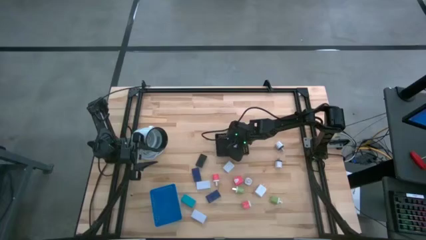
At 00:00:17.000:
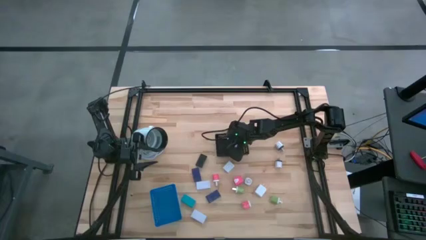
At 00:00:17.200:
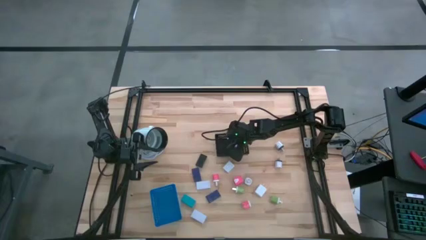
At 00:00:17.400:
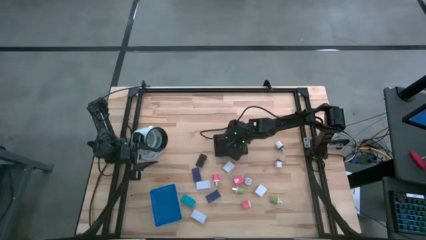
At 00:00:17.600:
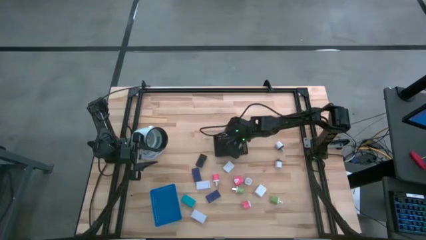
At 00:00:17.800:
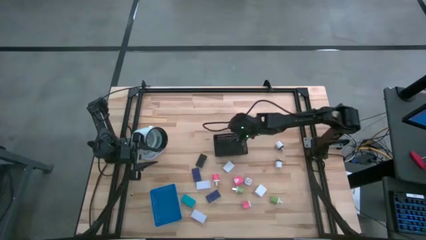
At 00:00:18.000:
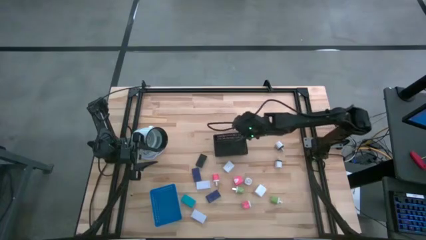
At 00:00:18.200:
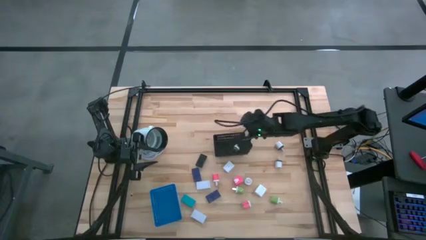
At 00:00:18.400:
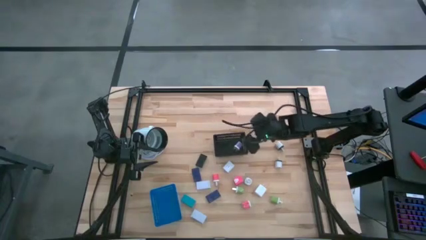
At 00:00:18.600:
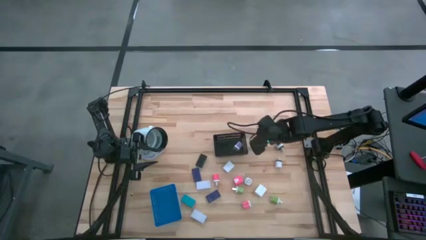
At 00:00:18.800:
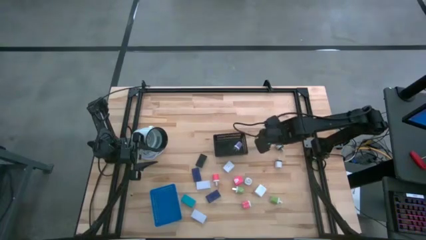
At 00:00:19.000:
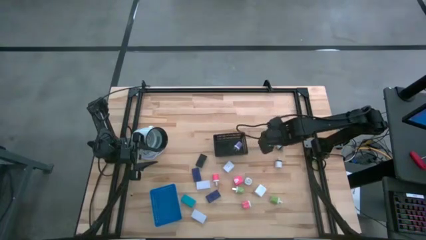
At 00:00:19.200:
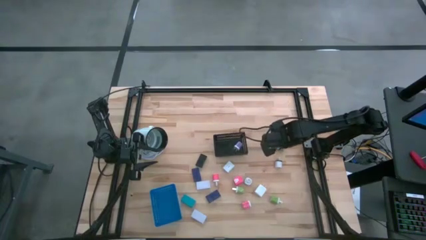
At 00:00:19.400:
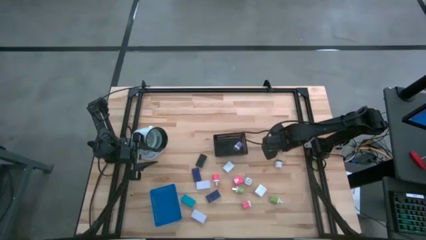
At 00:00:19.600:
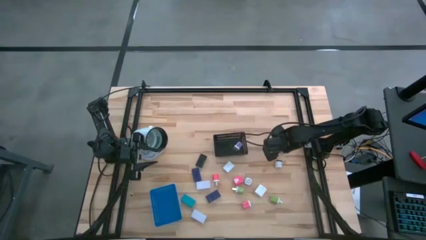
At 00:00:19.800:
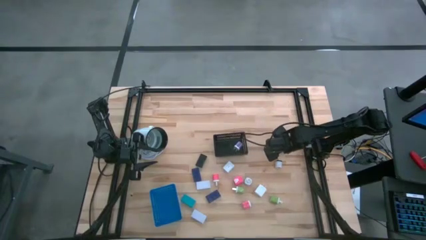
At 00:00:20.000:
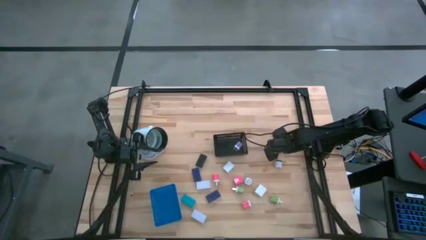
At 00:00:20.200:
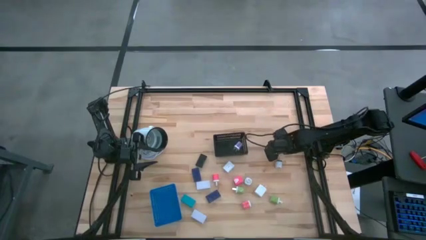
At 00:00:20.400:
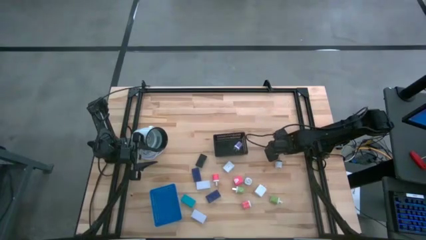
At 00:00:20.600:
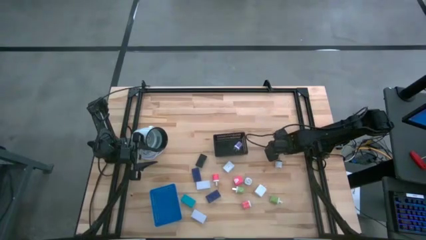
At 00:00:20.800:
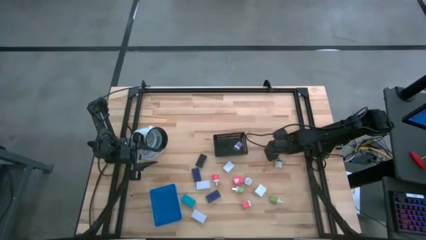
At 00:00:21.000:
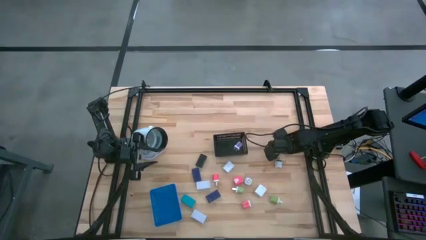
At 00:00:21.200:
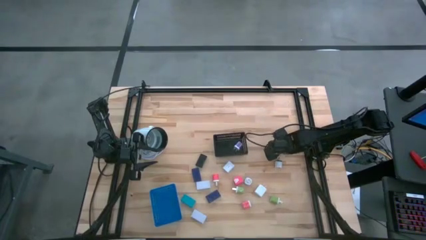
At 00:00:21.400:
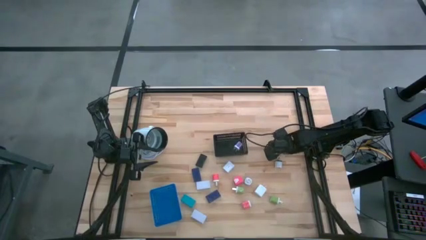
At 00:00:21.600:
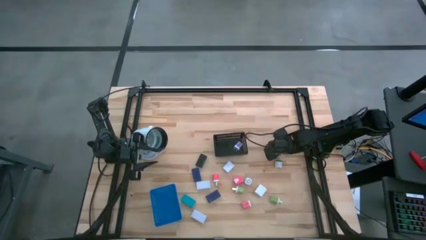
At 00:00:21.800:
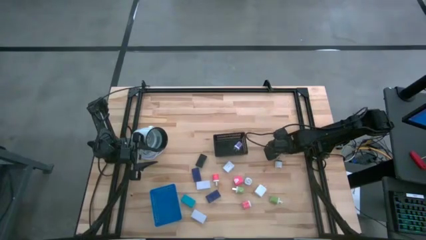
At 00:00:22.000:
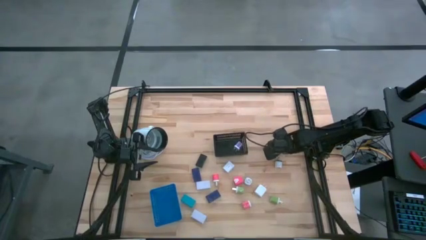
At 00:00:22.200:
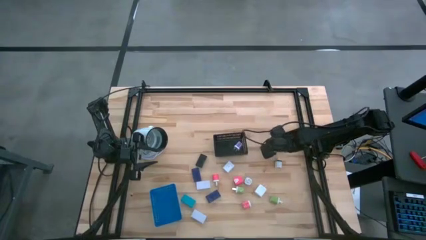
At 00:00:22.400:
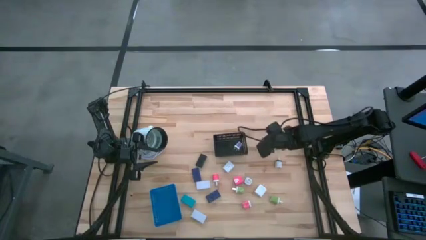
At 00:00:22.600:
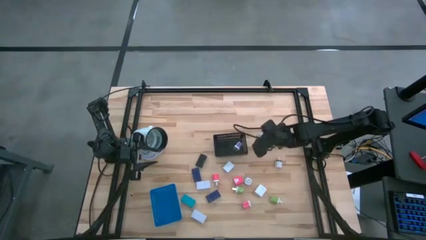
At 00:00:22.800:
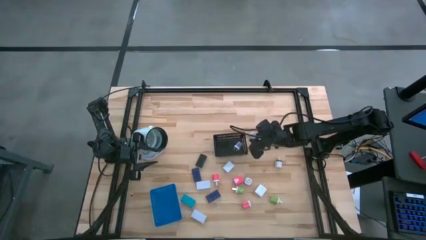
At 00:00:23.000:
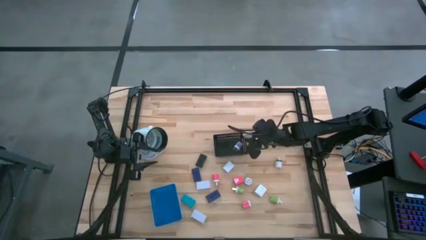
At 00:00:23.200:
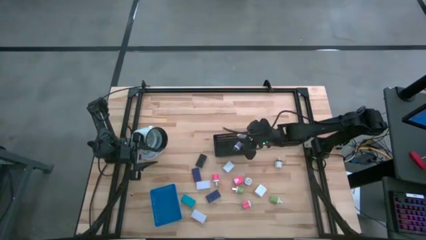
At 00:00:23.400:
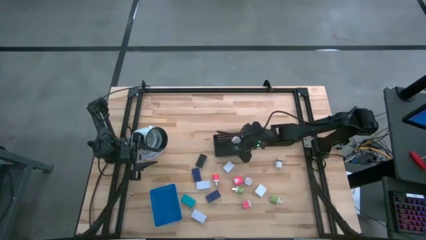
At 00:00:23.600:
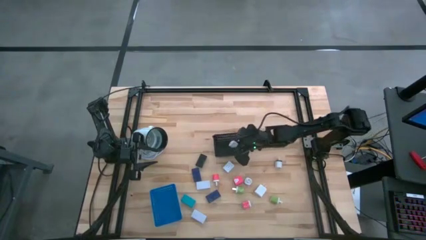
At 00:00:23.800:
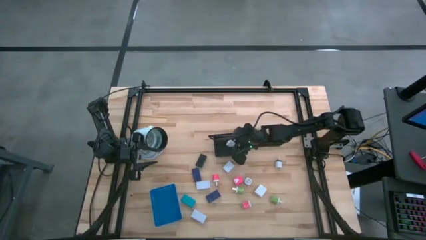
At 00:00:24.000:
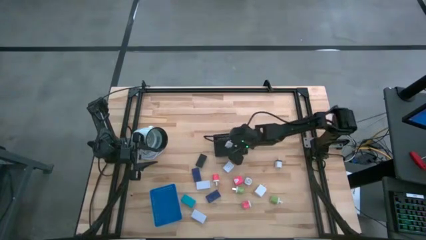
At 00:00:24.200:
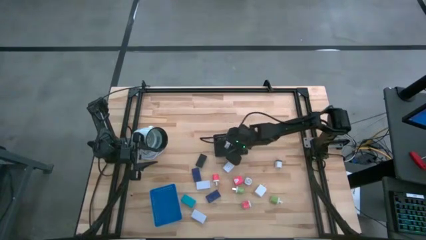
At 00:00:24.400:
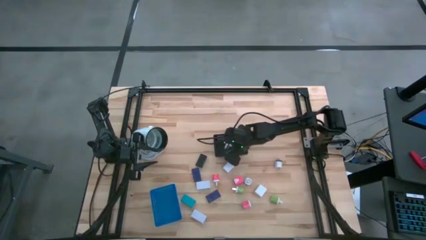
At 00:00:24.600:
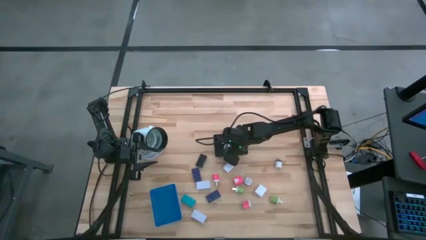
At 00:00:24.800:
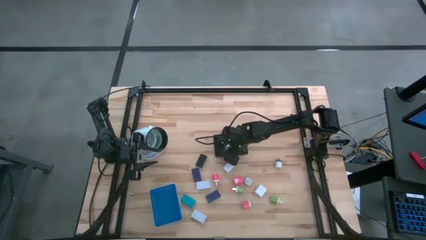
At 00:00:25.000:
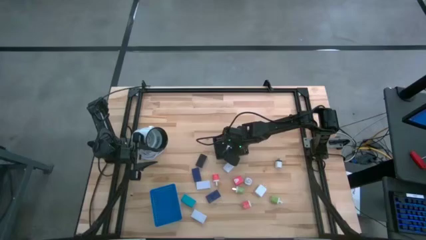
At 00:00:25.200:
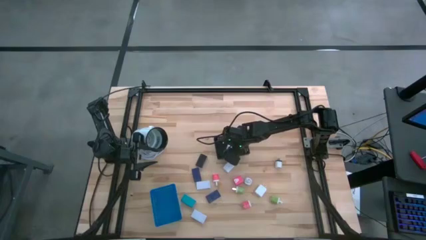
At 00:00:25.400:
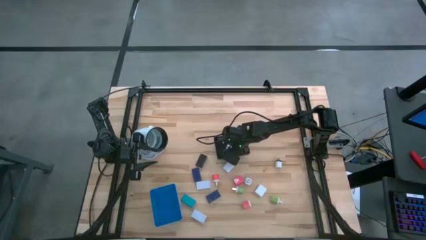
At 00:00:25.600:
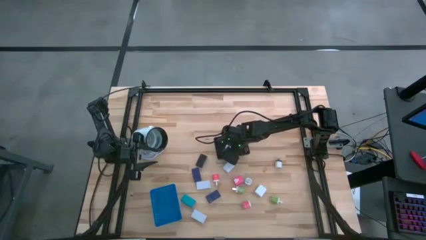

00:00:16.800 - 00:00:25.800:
Task: Pick & Place Office items
Put the top white black charger adapter into the black bin

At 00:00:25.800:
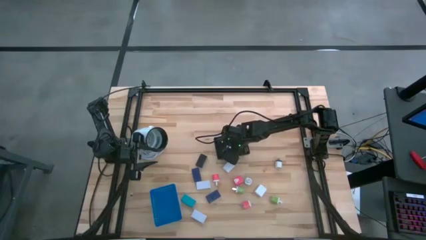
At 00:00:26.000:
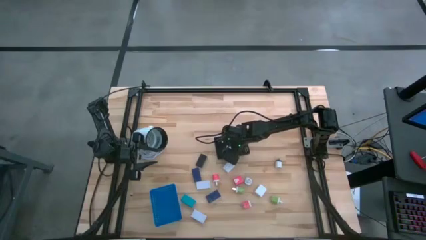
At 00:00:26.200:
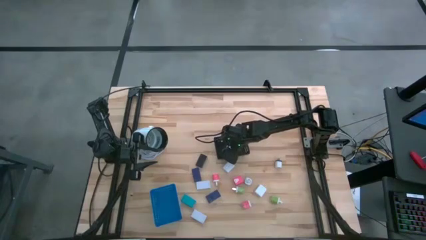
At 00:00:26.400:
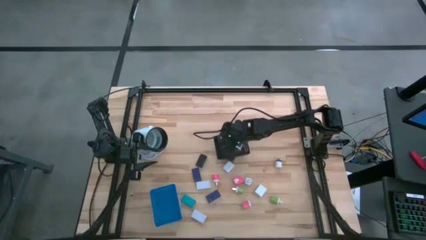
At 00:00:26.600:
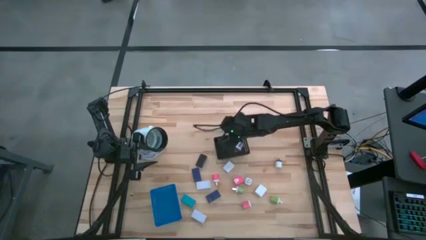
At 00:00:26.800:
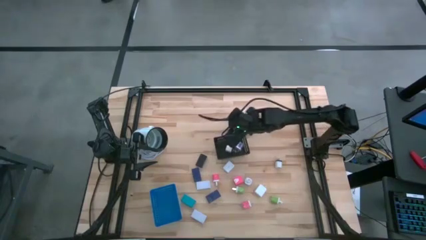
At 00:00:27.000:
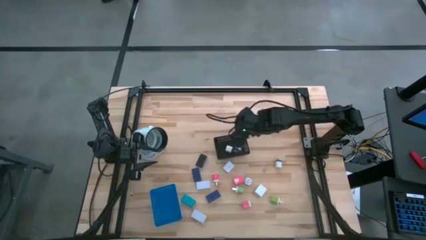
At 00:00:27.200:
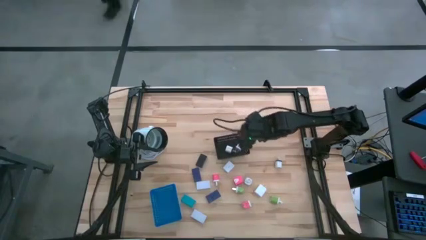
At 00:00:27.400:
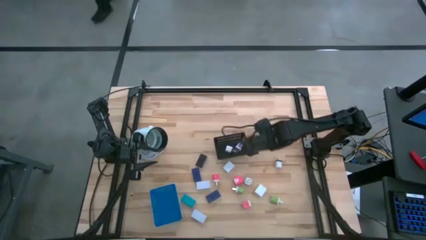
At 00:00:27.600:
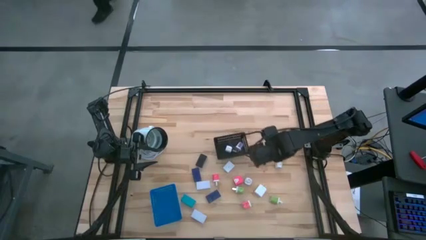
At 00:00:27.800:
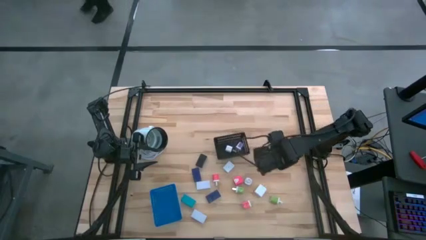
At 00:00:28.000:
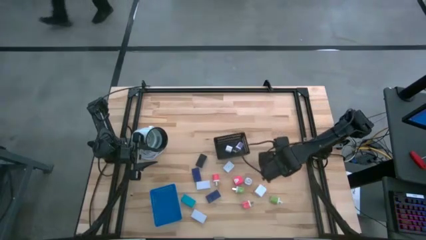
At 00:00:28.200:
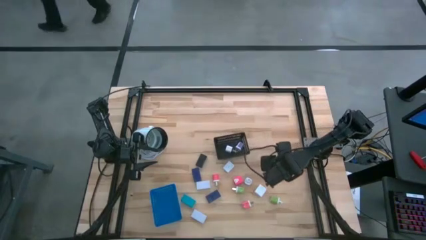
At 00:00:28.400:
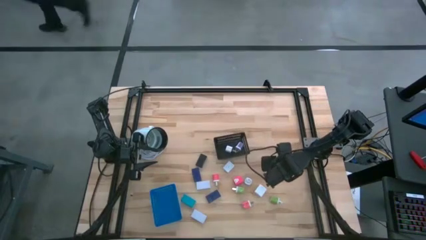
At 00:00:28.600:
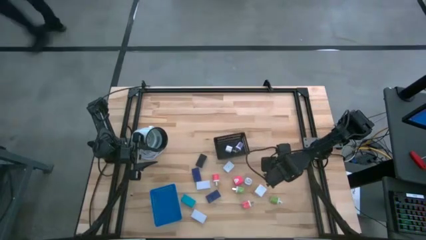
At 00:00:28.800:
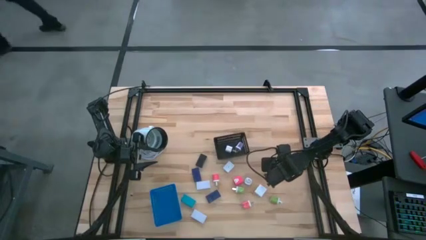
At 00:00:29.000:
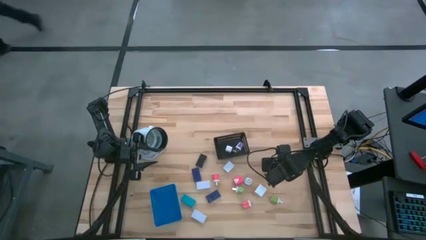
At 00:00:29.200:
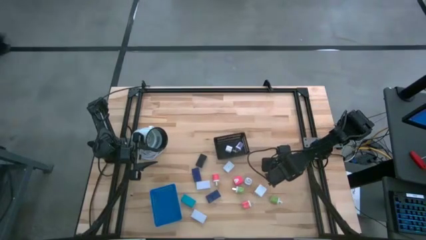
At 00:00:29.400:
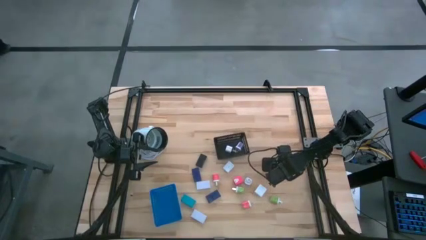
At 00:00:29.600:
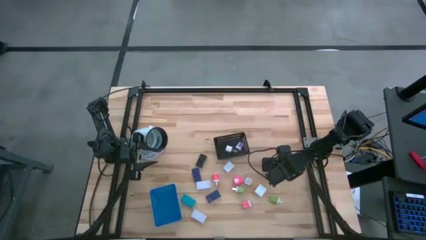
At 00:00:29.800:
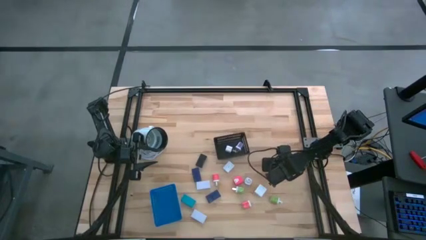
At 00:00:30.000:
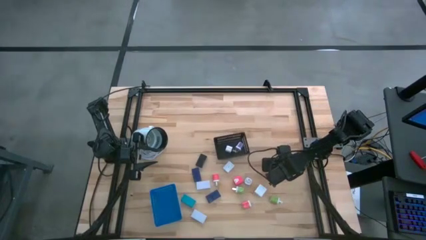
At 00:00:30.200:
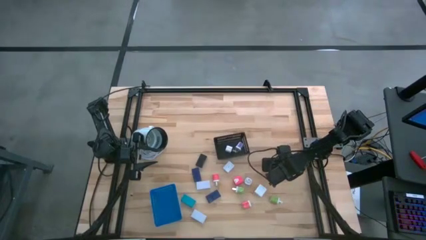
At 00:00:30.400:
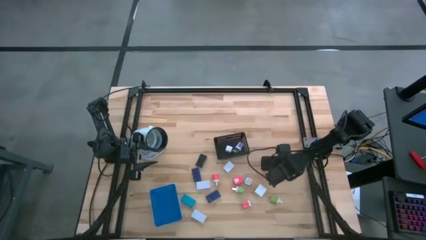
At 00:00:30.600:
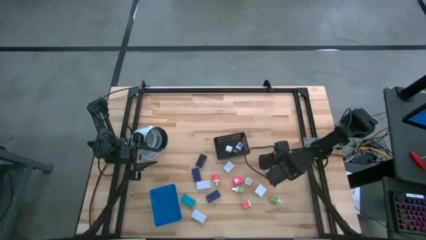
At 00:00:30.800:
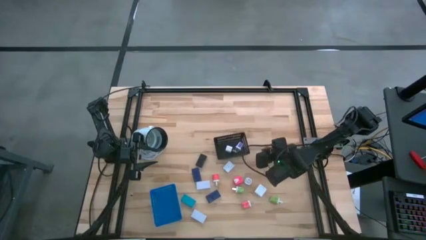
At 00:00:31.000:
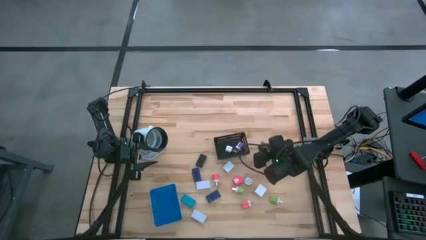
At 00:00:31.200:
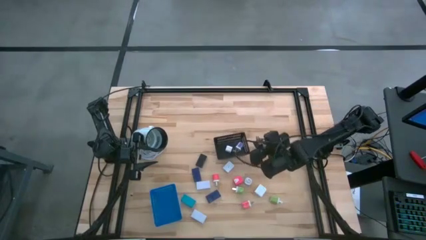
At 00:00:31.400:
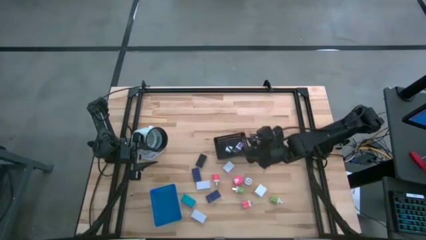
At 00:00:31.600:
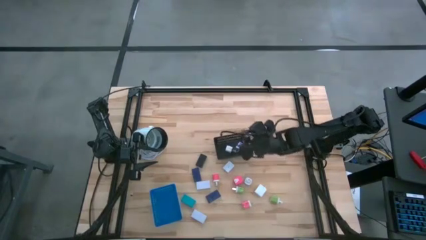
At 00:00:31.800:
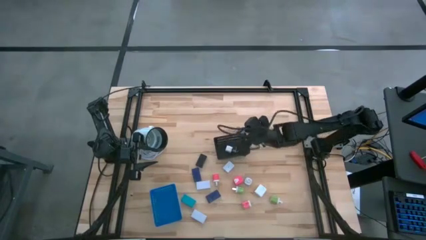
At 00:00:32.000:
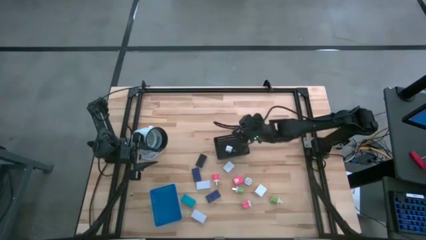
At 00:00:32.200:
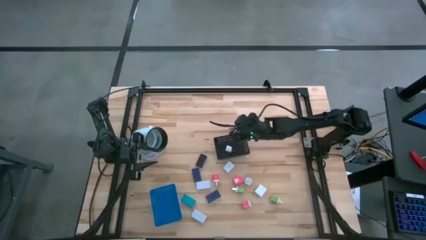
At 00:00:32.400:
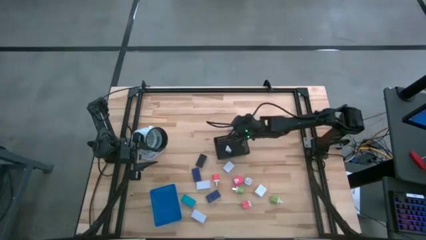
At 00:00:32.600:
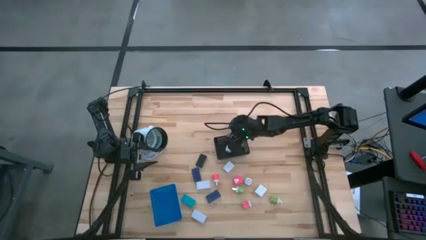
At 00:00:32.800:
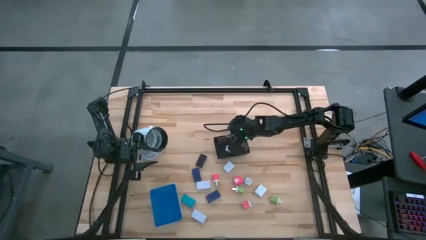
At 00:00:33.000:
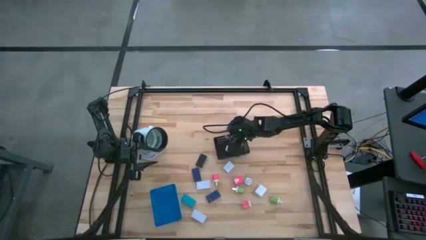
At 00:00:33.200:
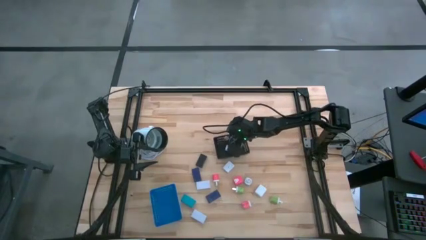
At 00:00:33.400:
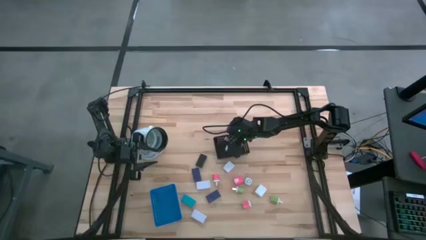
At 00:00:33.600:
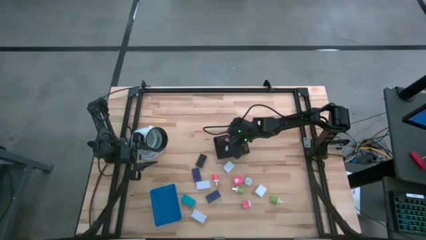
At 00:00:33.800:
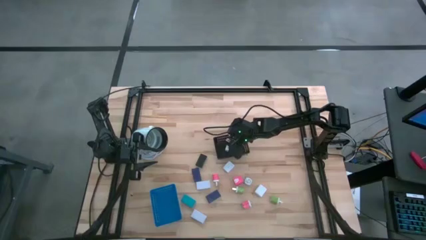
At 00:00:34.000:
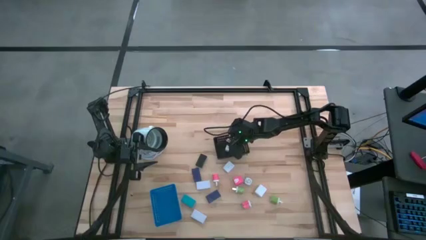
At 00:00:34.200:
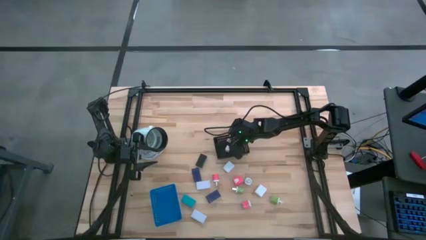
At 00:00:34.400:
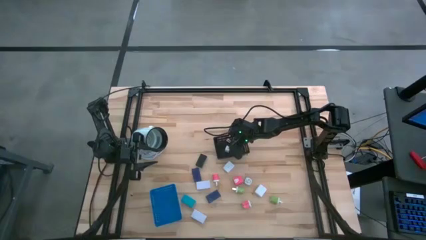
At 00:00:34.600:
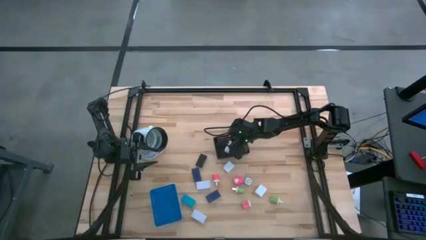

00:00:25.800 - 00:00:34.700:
Put the white black charger adapter into the black bin
